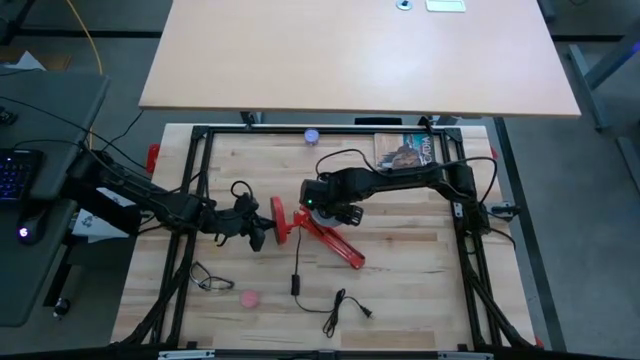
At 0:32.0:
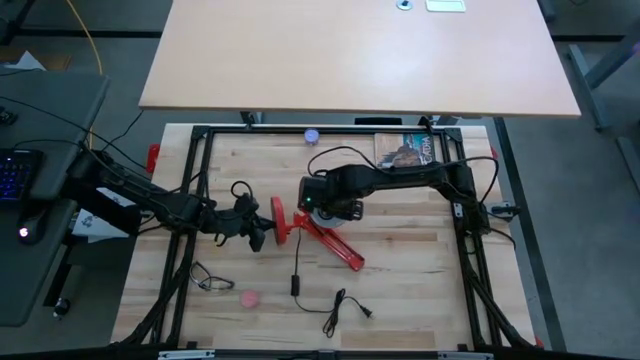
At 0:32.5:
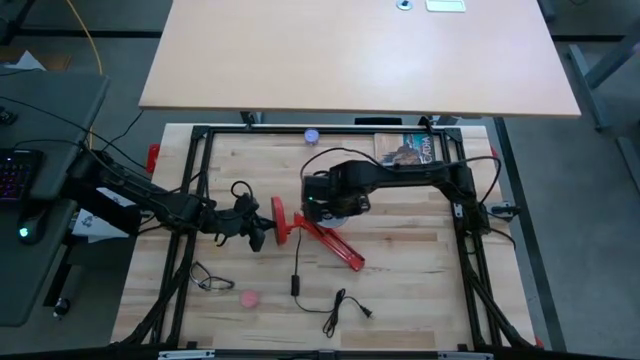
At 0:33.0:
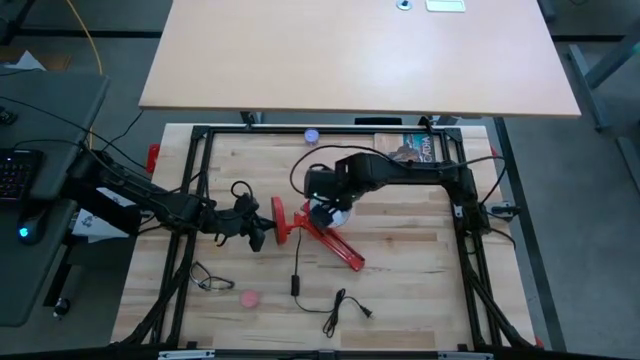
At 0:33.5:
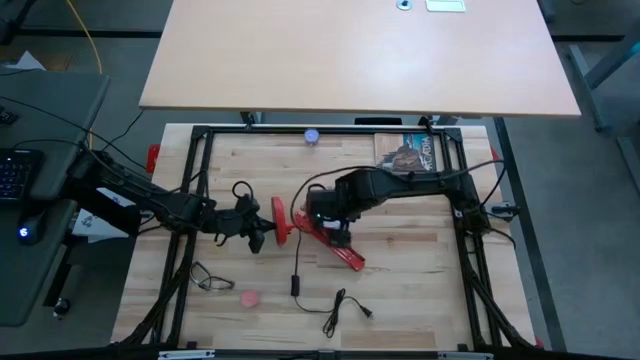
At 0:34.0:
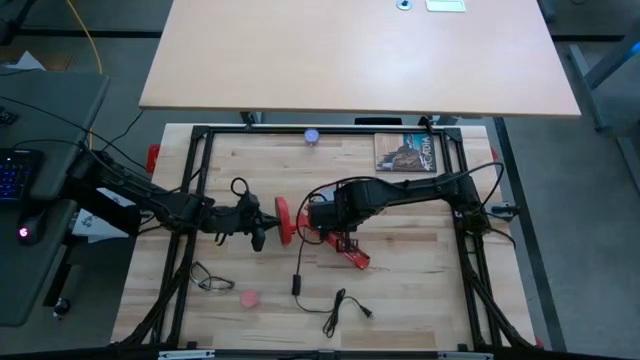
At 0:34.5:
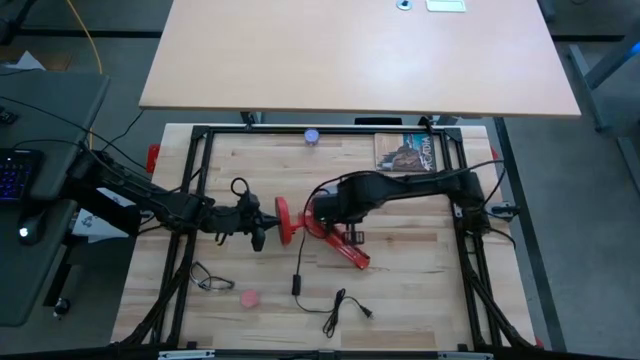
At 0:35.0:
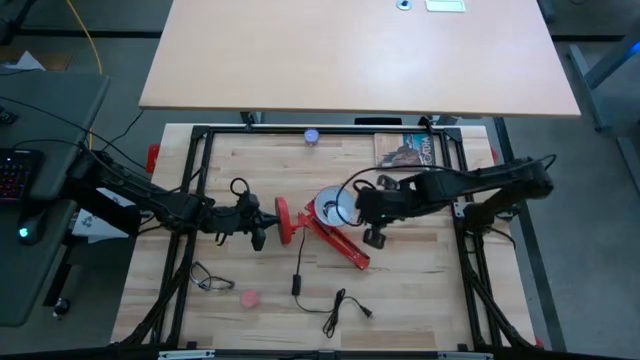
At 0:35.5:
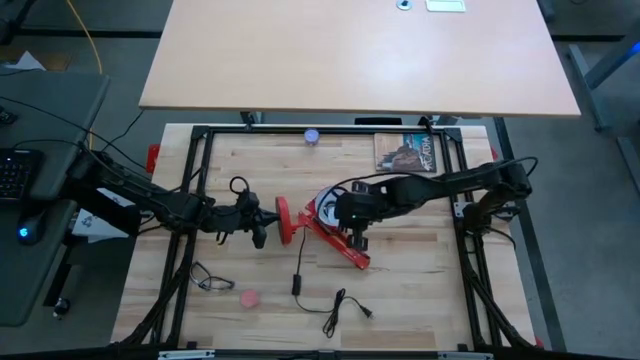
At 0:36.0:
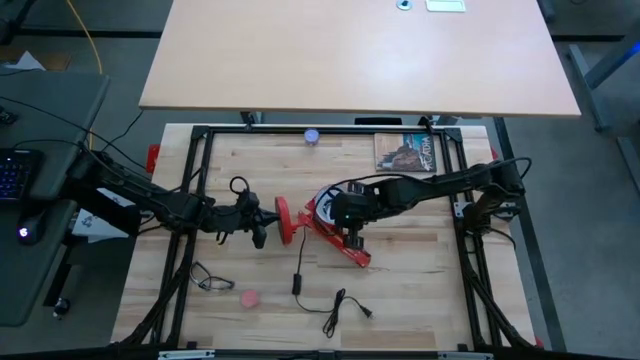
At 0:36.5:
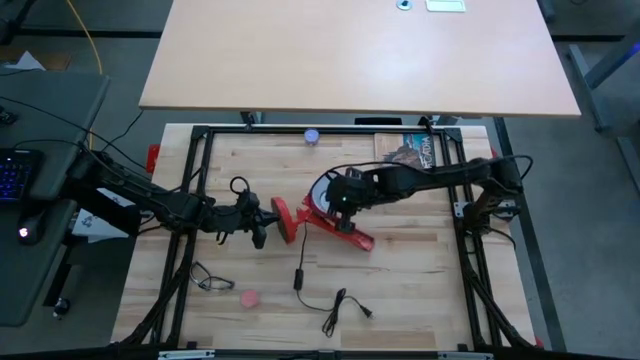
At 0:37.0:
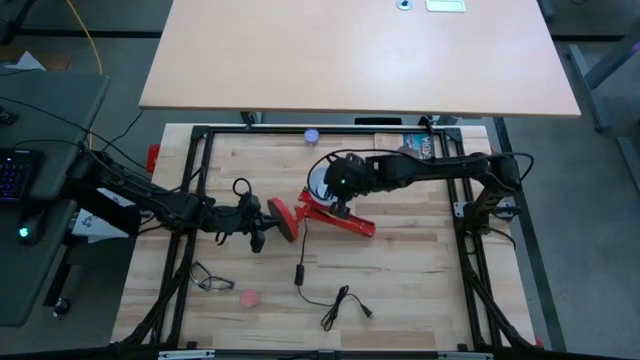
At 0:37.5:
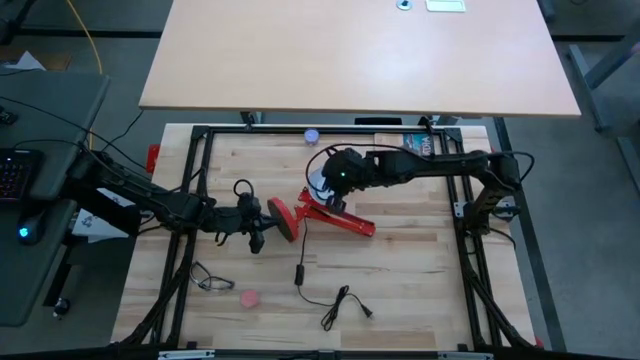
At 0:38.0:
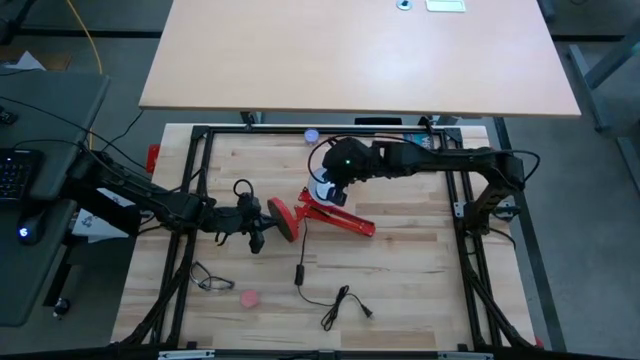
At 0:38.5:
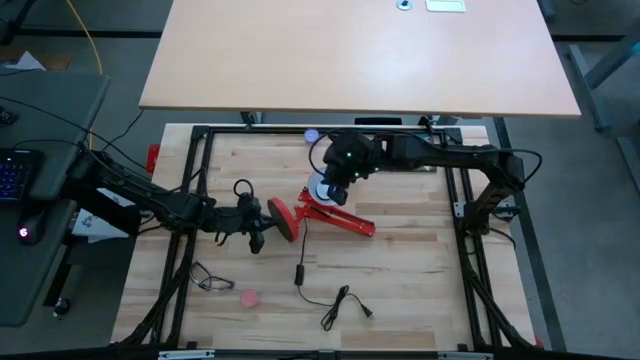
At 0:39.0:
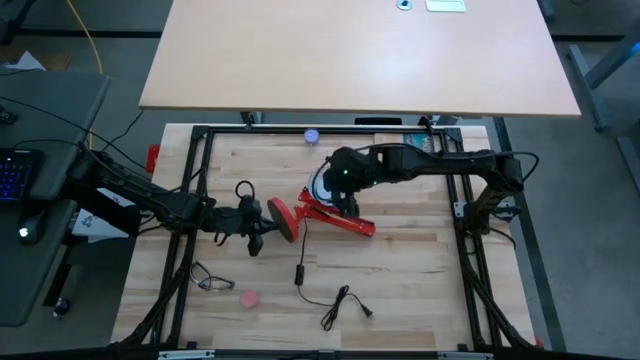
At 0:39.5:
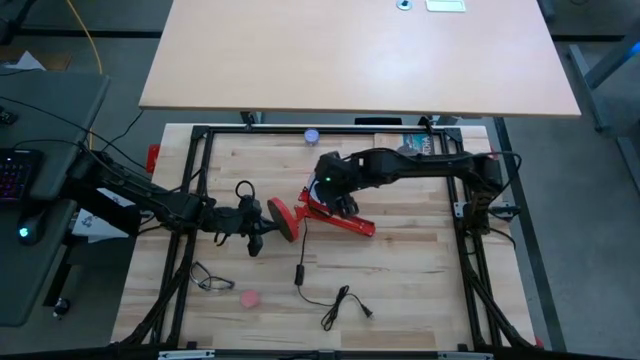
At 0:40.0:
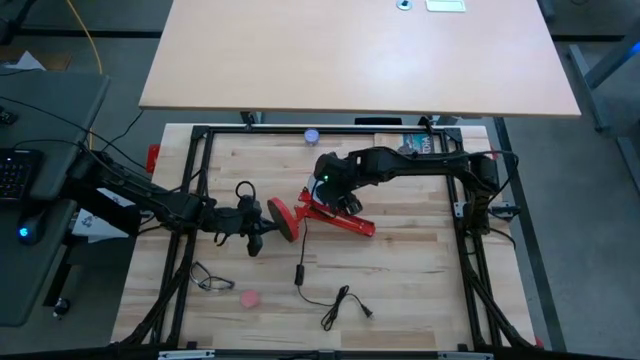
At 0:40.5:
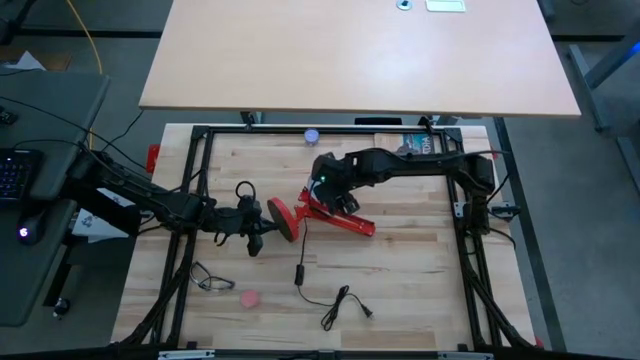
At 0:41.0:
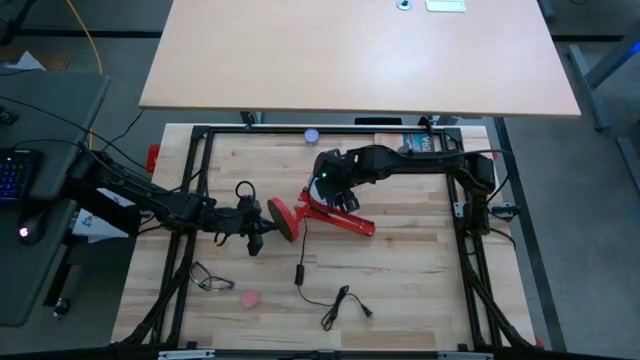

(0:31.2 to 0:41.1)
Task: Screw lightbulb
Insert the lightbulb into the desk lamp

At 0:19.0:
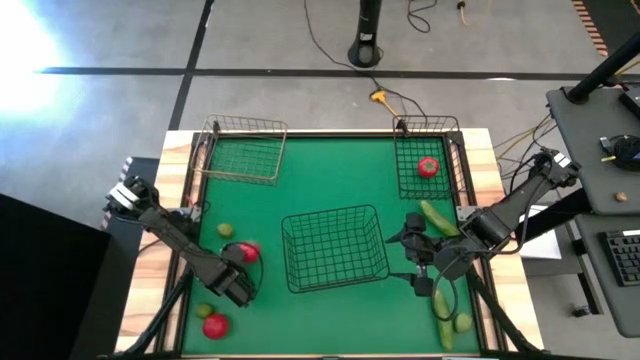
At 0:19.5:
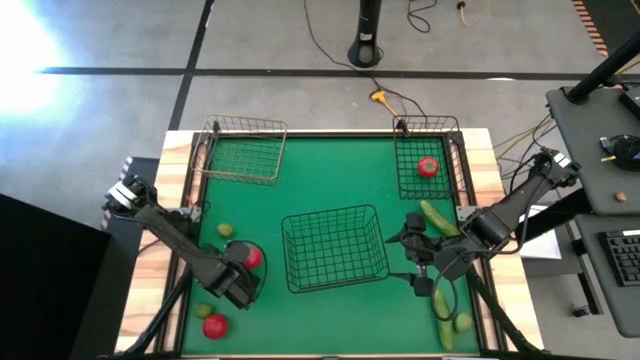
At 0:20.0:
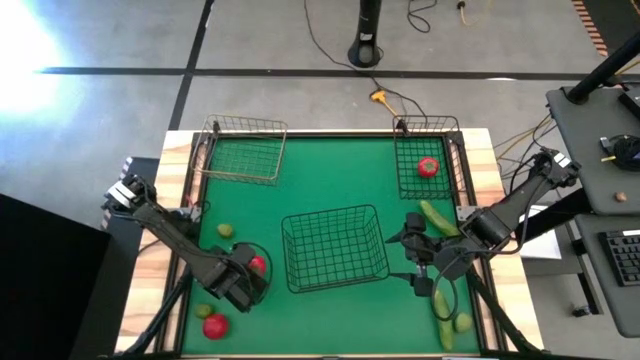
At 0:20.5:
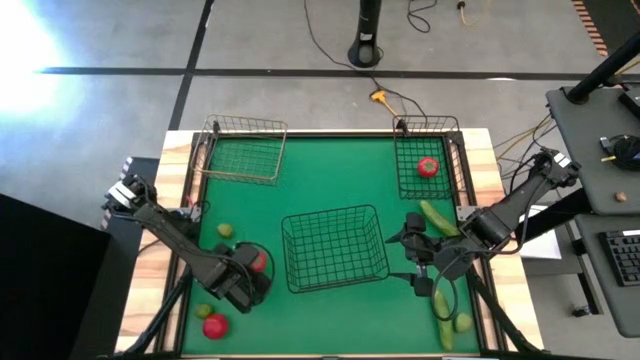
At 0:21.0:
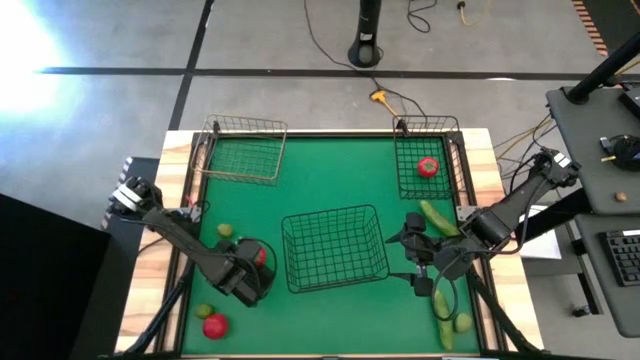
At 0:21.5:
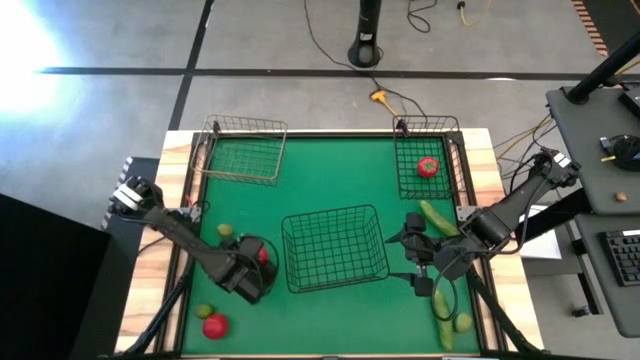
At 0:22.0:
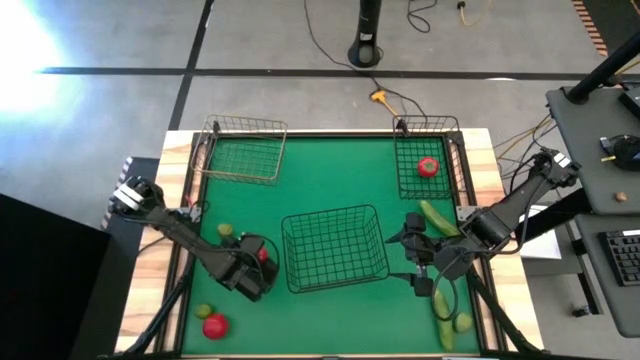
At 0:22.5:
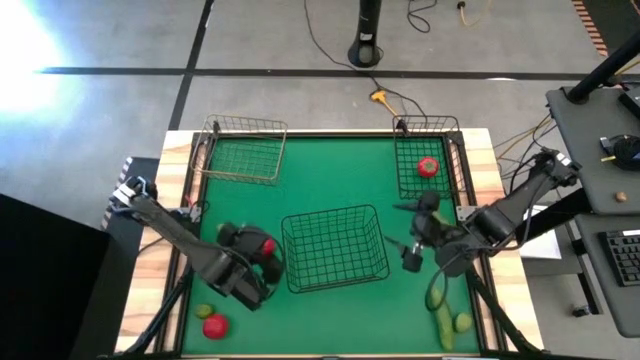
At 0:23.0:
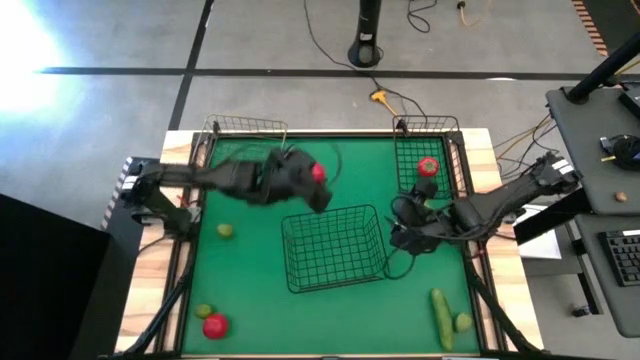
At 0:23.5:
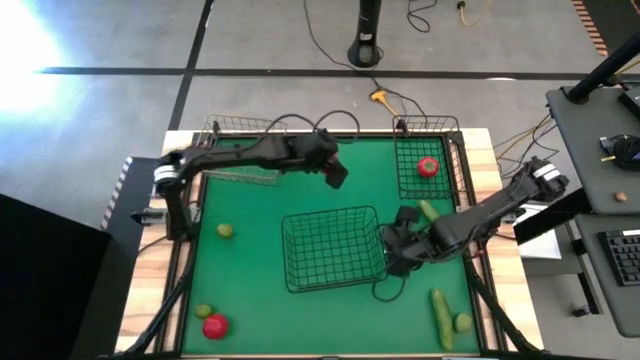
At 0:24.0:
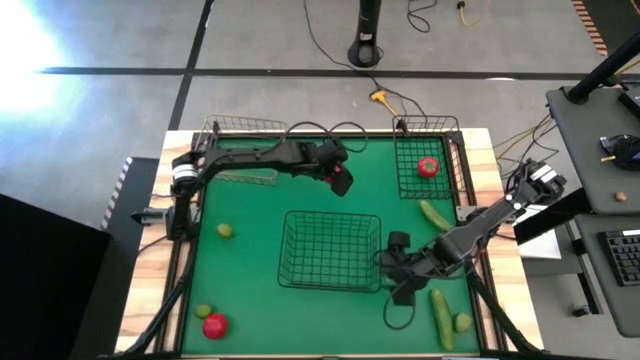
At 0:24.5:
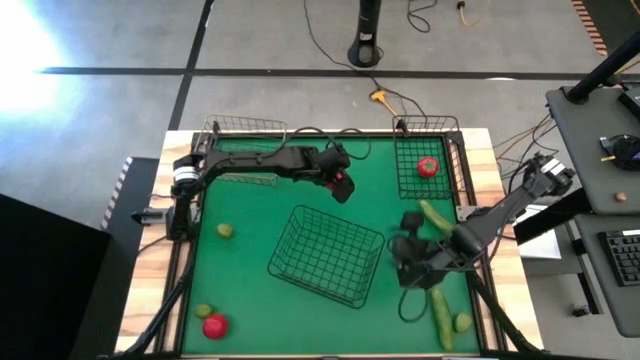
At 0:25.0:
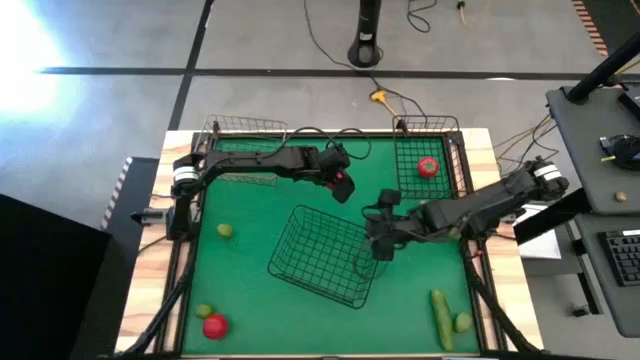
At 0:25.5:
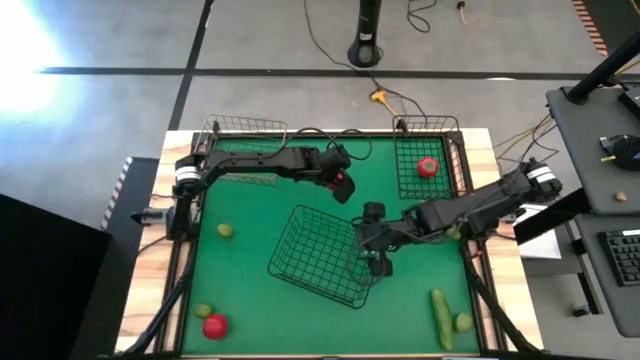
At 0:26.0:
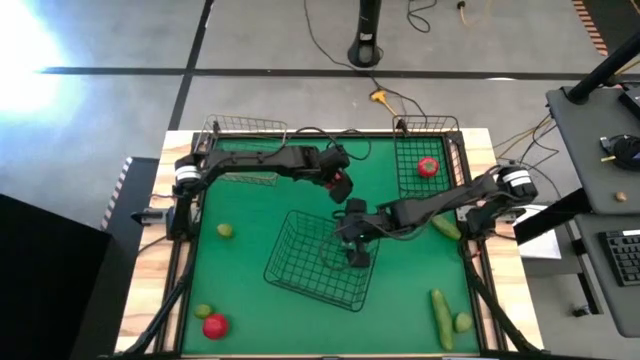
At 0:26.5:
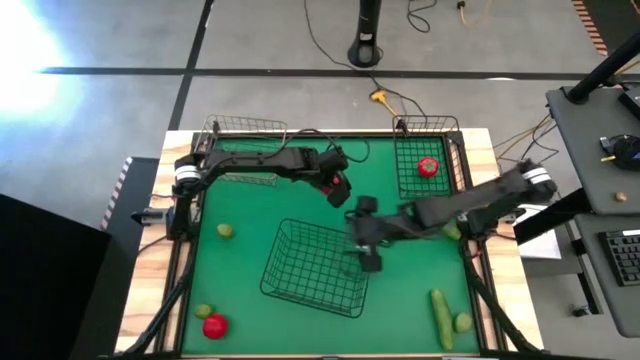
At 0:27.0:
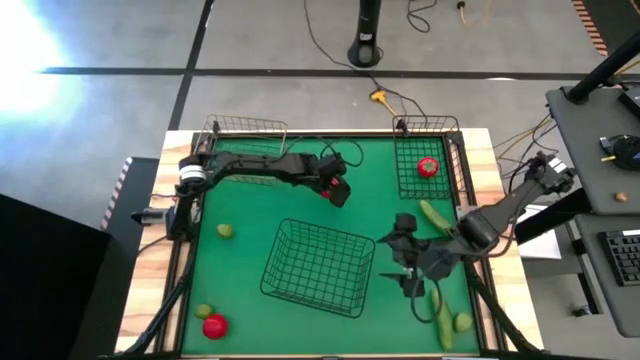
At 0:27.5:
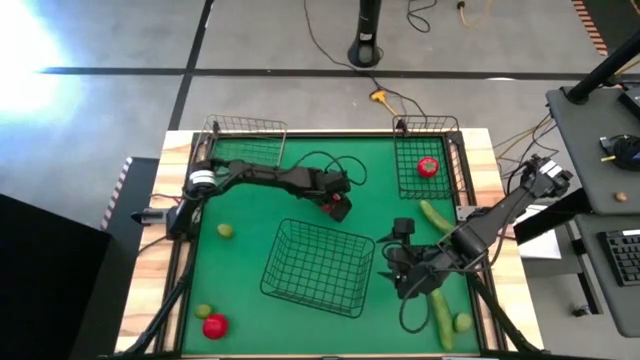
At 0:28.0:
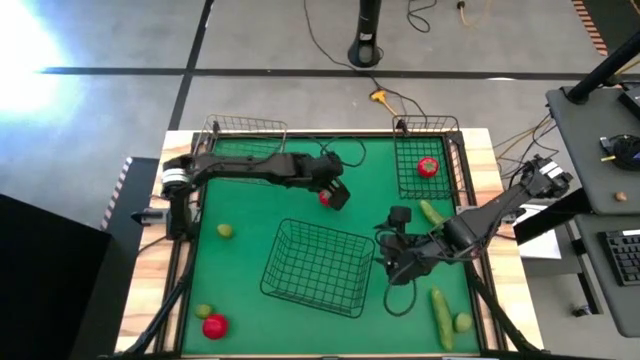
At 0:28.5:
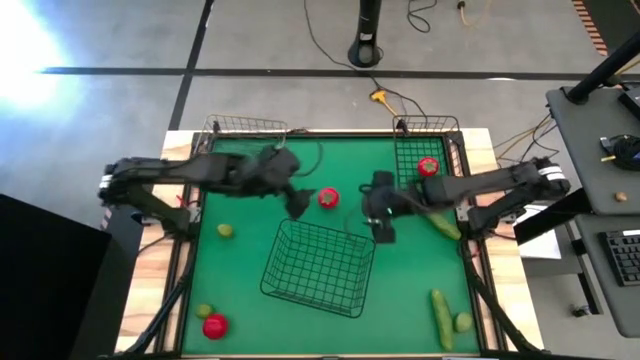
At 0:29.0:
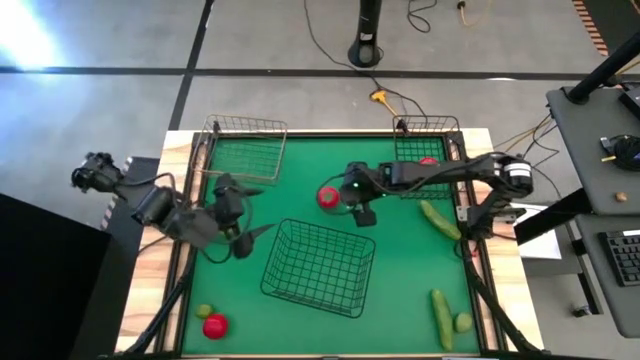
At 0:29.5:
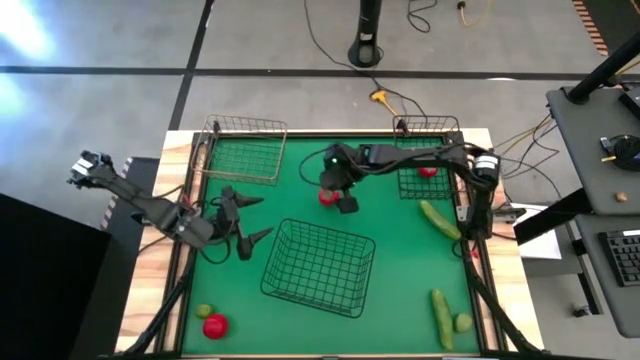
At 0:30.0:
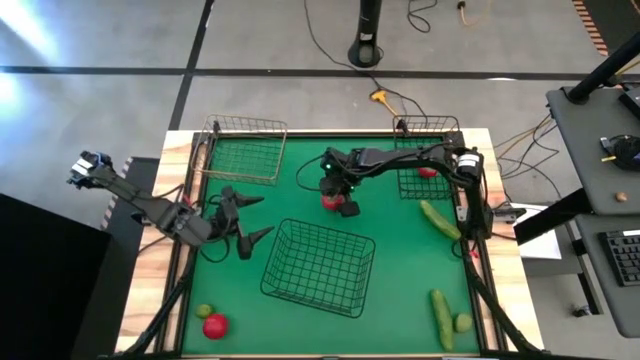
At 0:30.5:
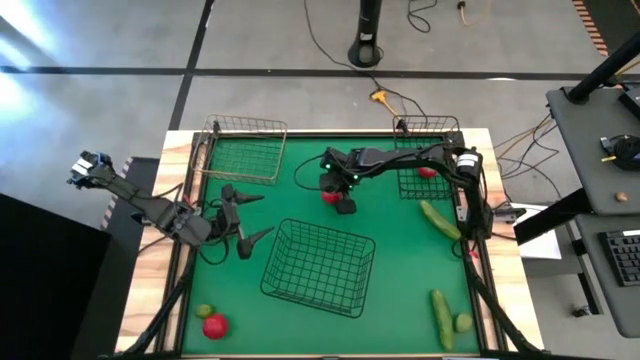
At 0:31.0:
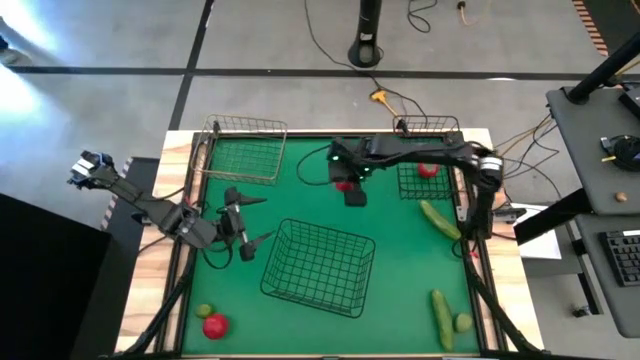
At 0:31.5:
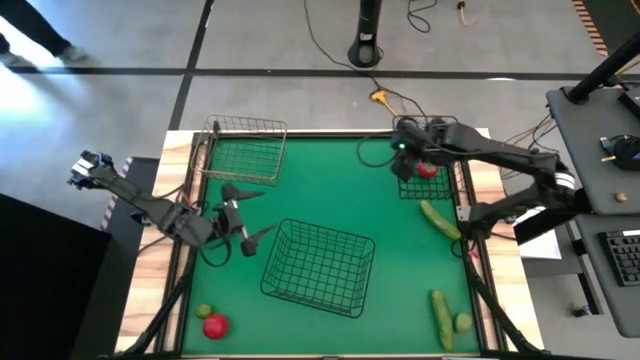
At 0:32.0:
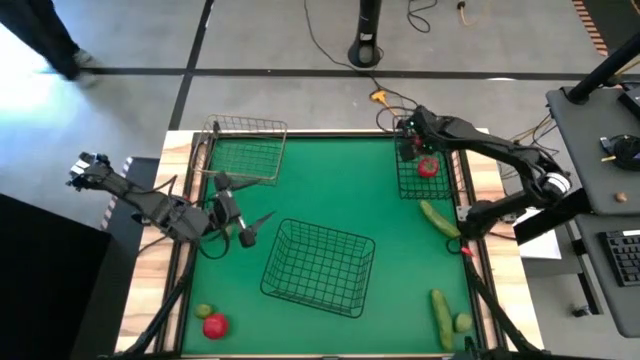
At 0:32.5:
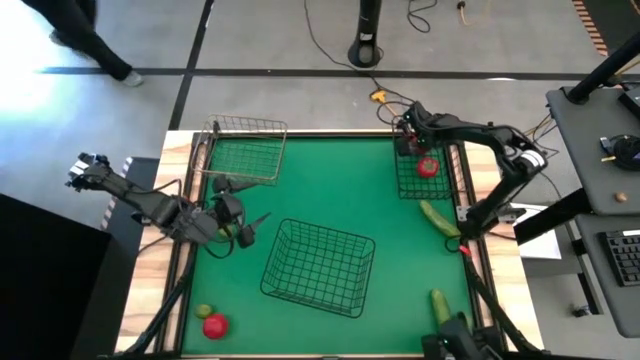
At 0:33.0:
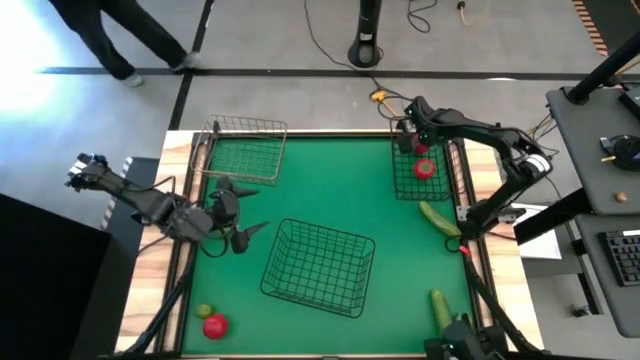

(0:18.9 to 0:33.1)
Task: Sort produce into baskets
Put the top tomato into the top black wire basket
